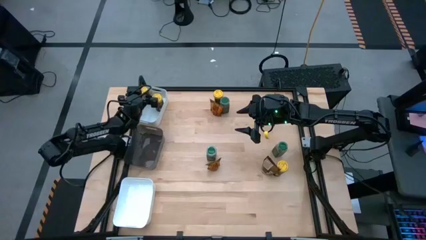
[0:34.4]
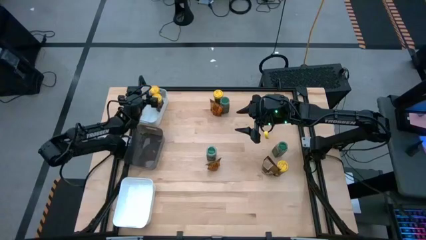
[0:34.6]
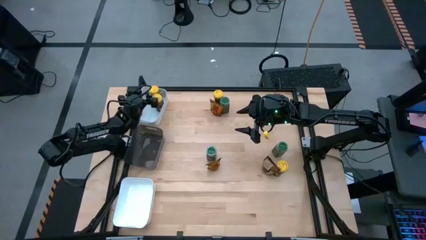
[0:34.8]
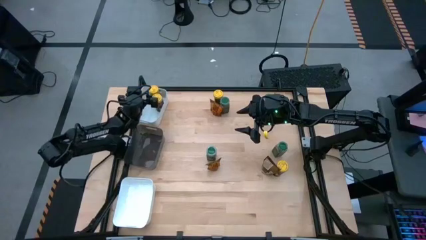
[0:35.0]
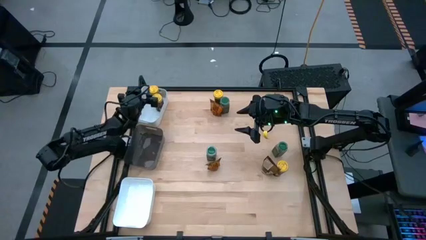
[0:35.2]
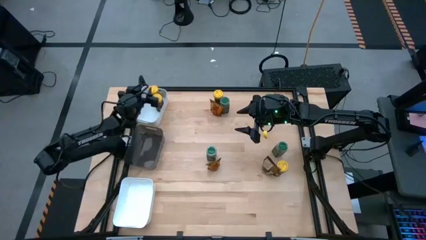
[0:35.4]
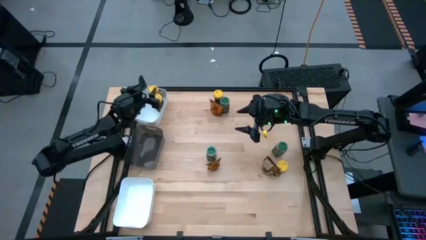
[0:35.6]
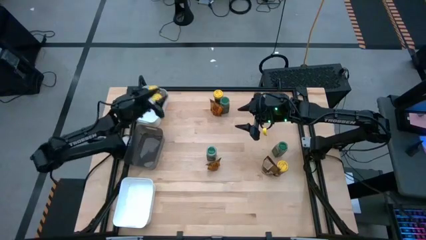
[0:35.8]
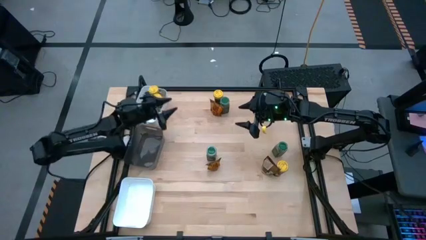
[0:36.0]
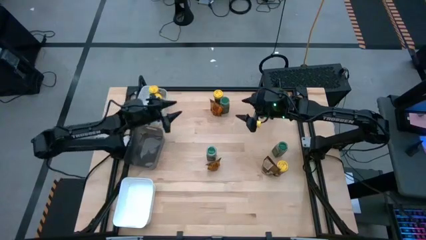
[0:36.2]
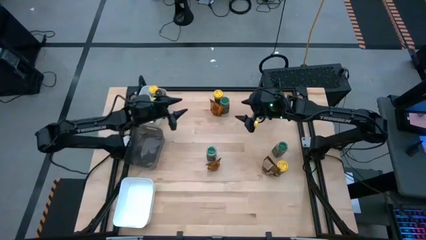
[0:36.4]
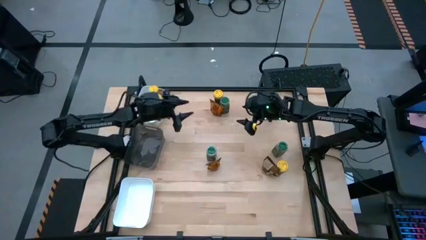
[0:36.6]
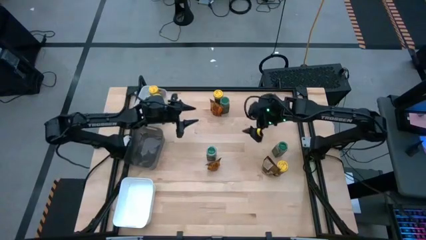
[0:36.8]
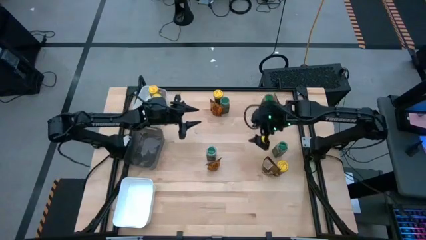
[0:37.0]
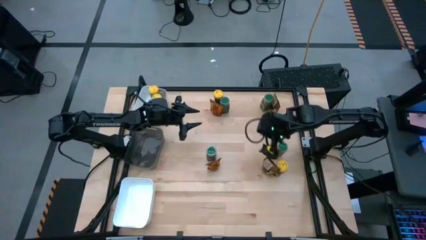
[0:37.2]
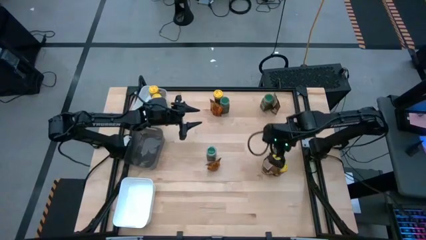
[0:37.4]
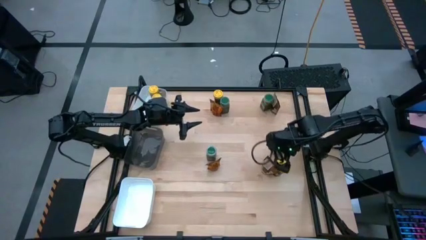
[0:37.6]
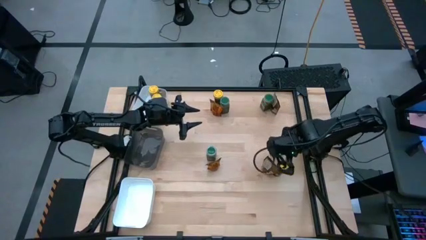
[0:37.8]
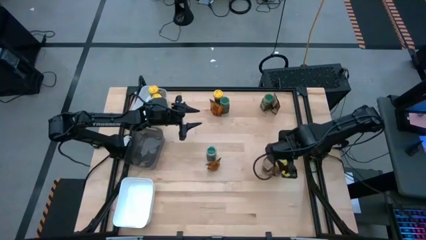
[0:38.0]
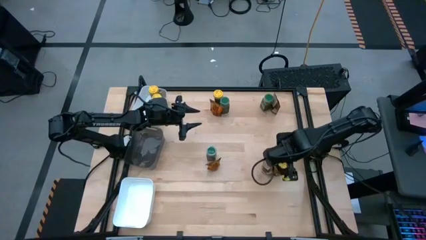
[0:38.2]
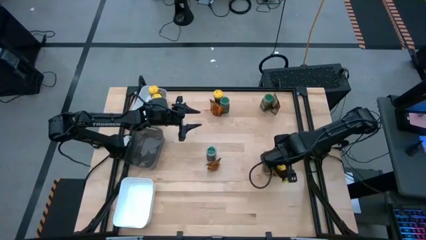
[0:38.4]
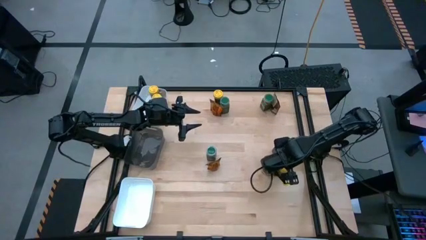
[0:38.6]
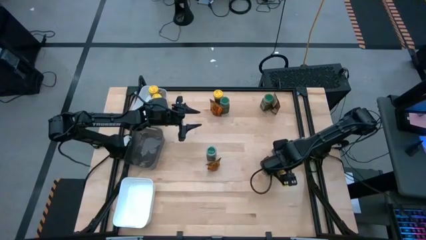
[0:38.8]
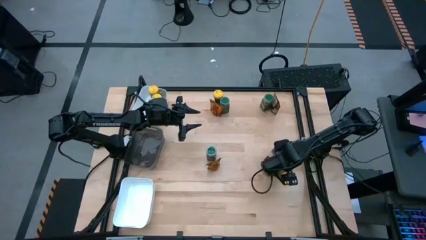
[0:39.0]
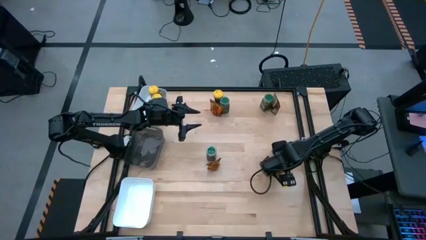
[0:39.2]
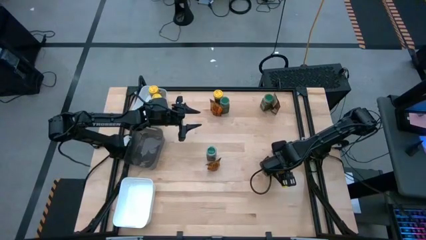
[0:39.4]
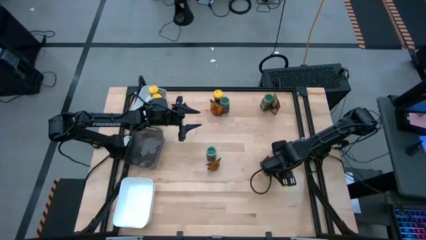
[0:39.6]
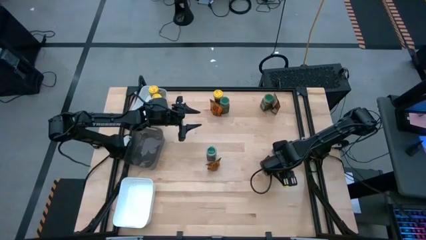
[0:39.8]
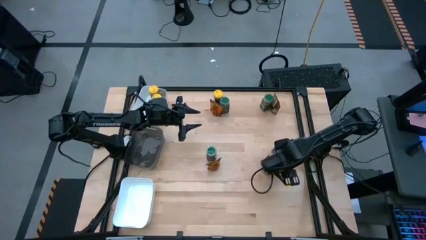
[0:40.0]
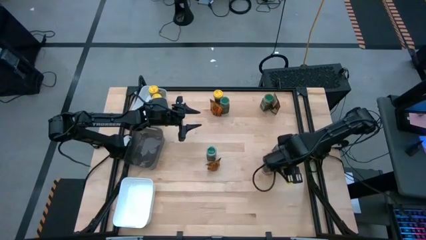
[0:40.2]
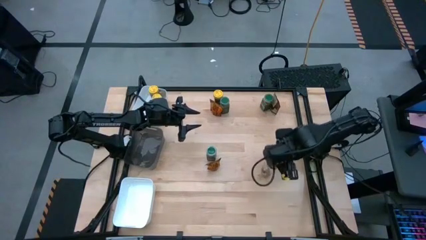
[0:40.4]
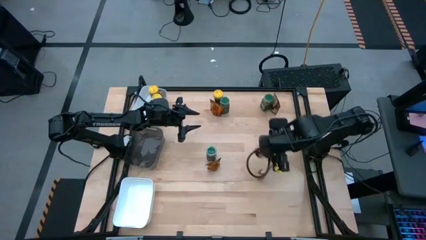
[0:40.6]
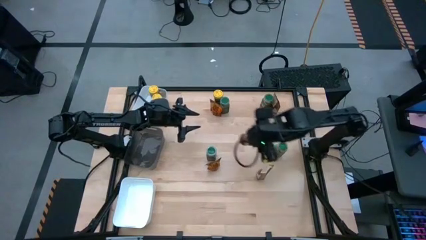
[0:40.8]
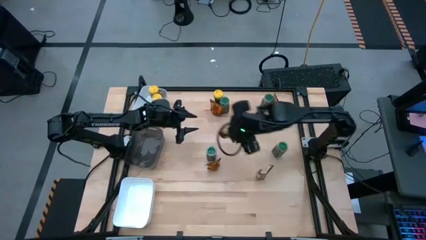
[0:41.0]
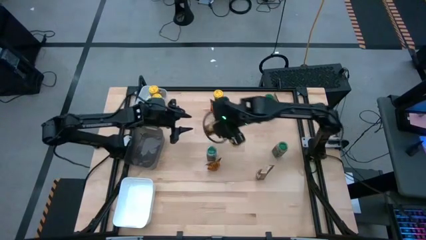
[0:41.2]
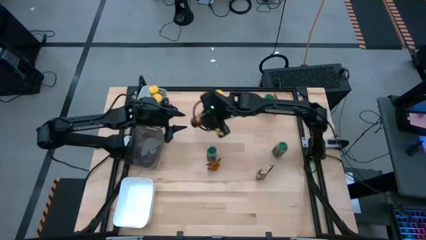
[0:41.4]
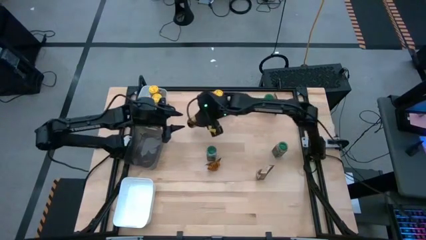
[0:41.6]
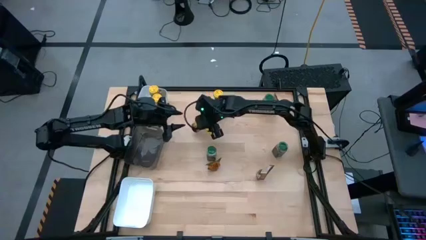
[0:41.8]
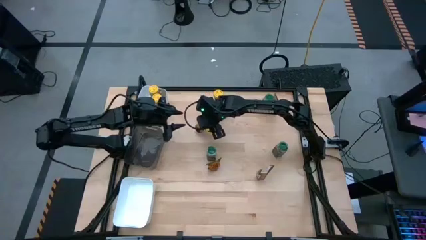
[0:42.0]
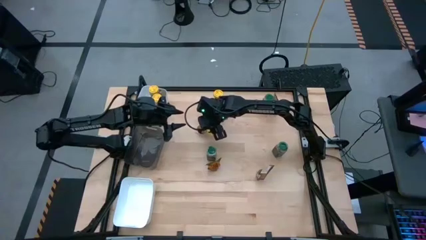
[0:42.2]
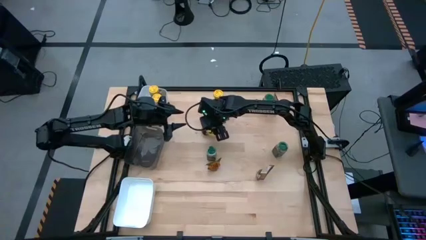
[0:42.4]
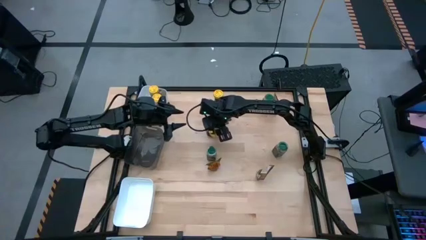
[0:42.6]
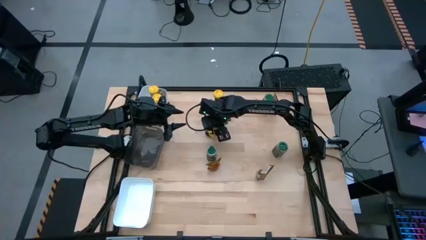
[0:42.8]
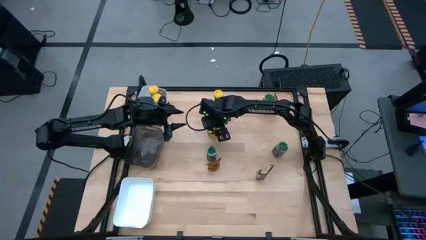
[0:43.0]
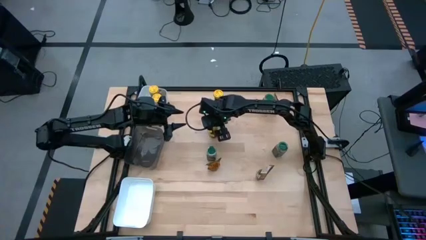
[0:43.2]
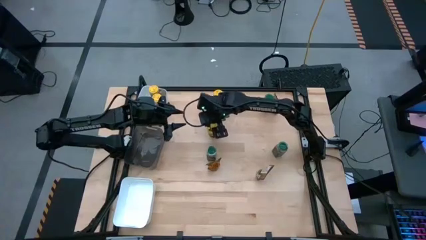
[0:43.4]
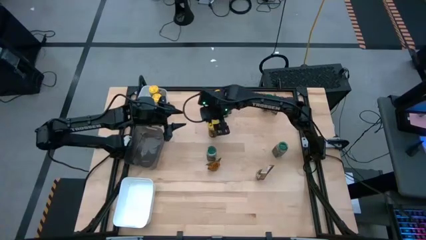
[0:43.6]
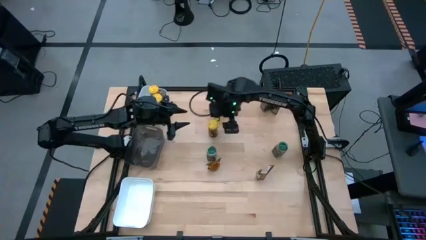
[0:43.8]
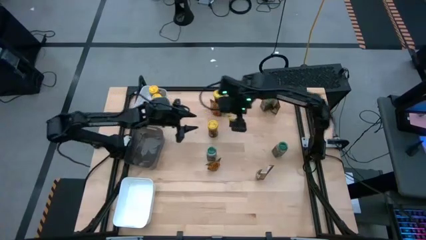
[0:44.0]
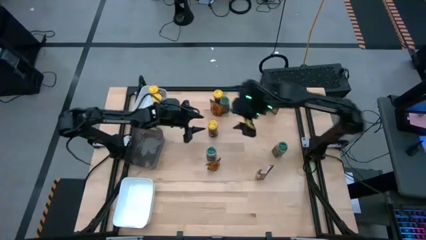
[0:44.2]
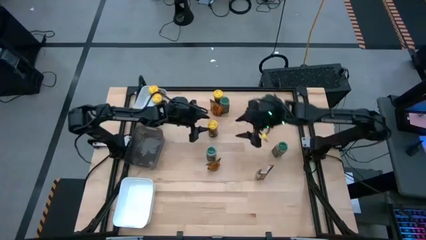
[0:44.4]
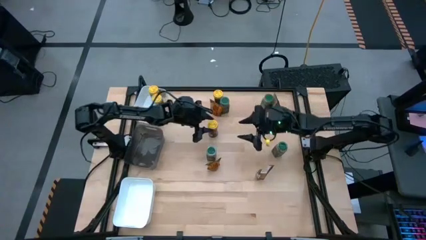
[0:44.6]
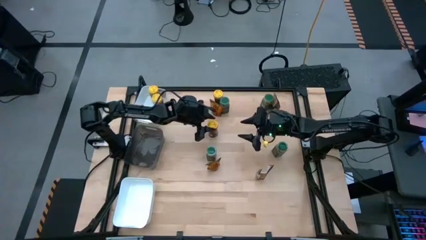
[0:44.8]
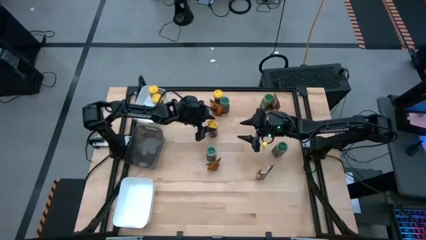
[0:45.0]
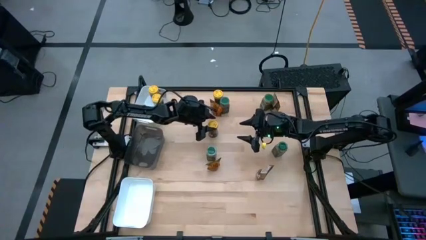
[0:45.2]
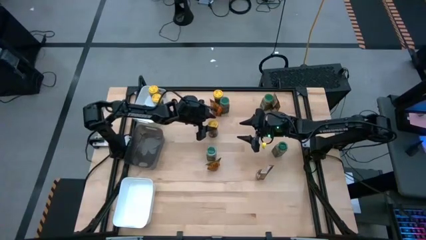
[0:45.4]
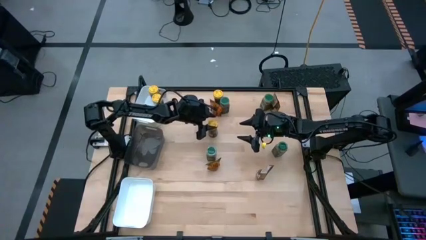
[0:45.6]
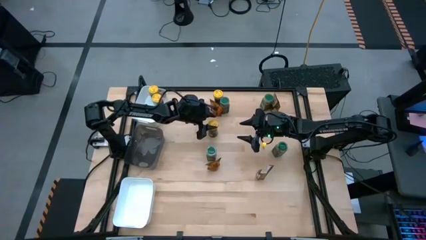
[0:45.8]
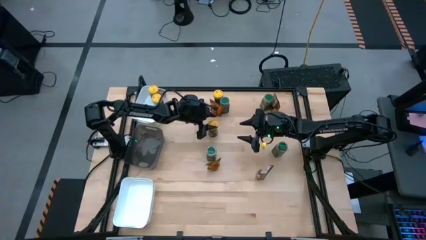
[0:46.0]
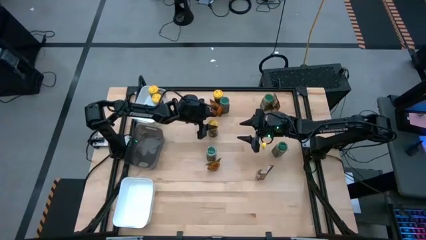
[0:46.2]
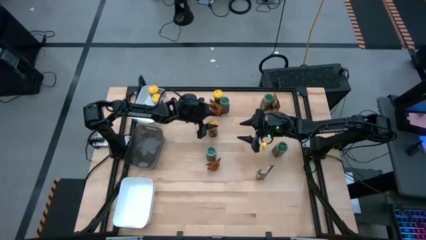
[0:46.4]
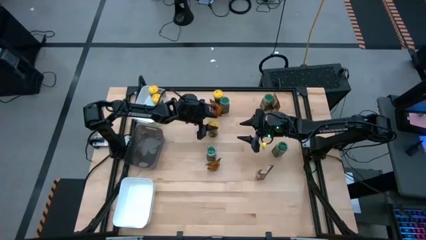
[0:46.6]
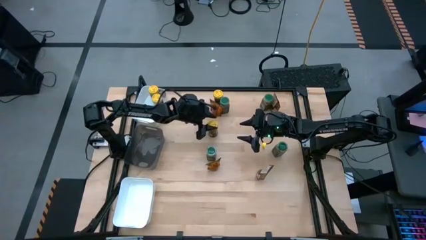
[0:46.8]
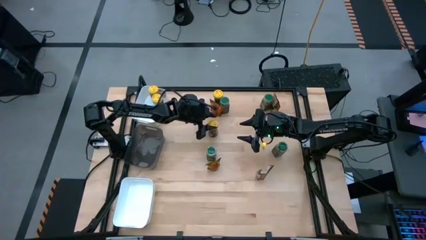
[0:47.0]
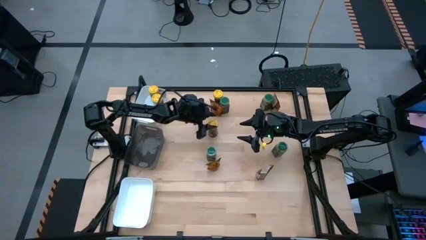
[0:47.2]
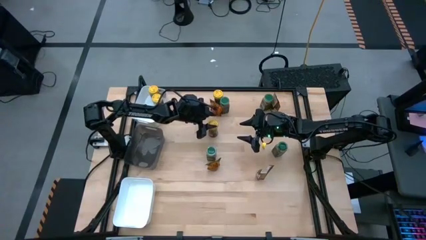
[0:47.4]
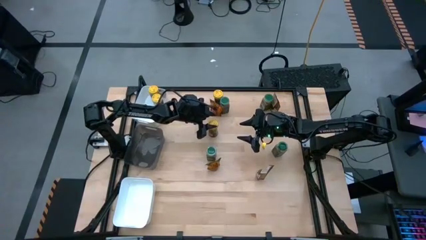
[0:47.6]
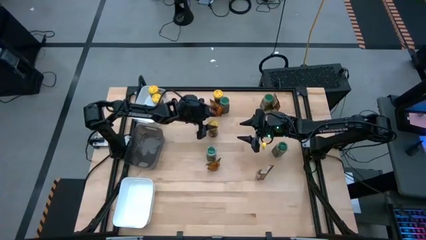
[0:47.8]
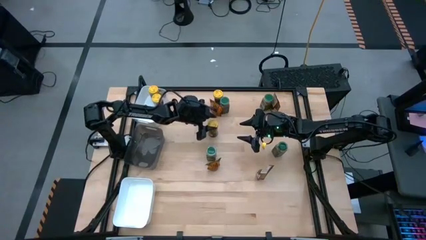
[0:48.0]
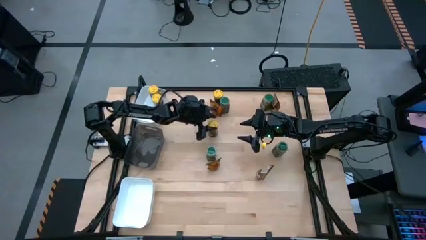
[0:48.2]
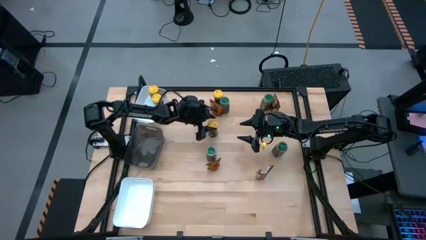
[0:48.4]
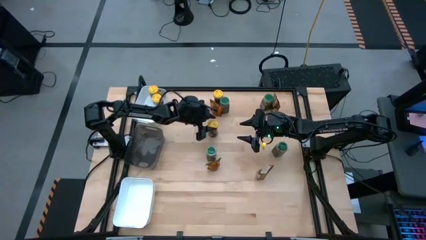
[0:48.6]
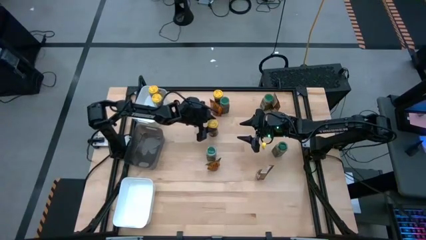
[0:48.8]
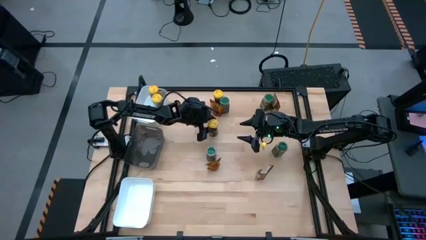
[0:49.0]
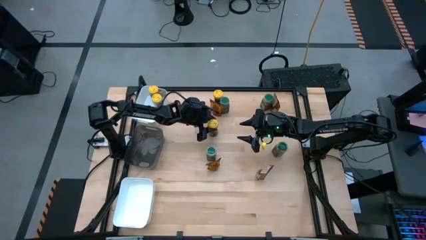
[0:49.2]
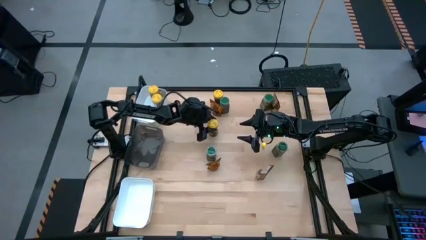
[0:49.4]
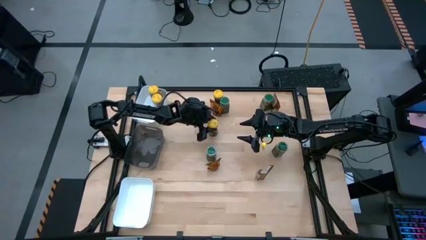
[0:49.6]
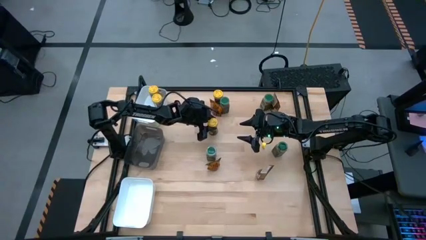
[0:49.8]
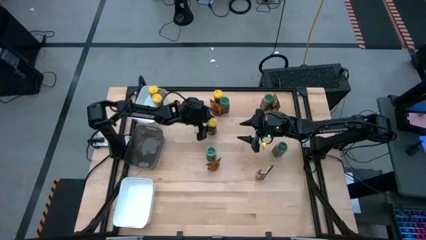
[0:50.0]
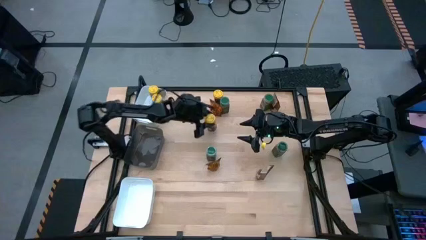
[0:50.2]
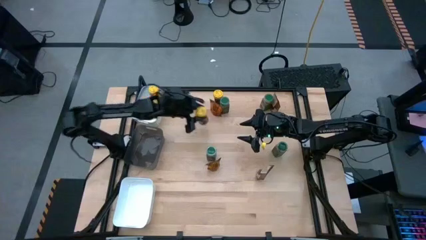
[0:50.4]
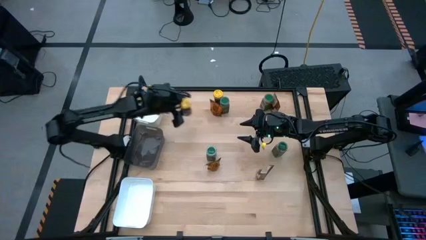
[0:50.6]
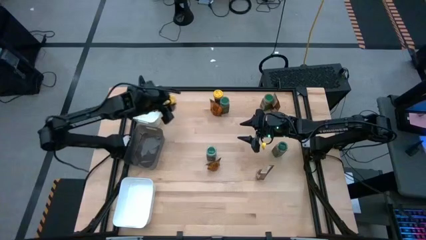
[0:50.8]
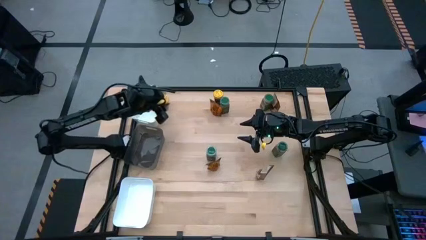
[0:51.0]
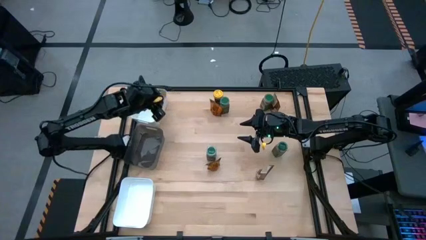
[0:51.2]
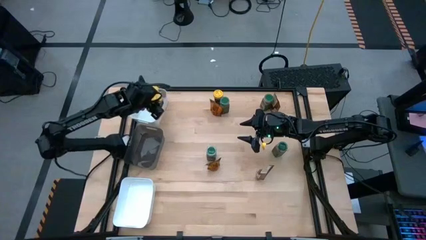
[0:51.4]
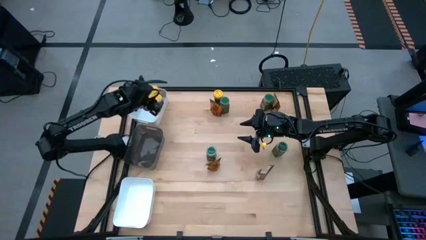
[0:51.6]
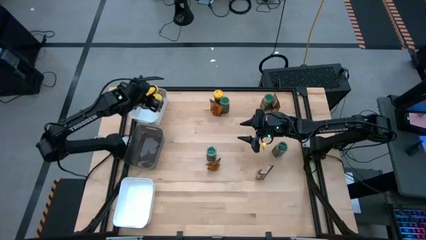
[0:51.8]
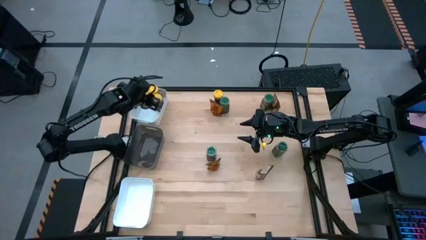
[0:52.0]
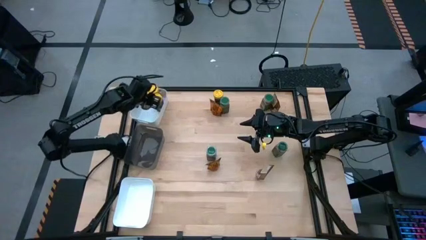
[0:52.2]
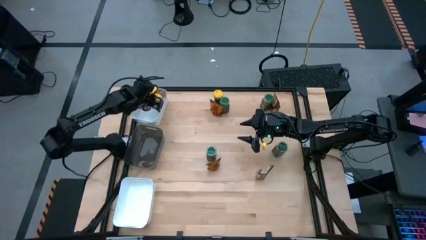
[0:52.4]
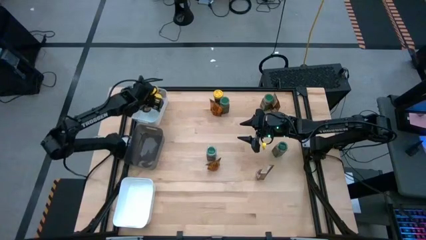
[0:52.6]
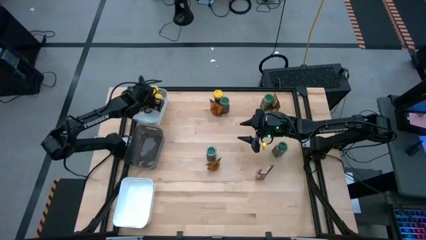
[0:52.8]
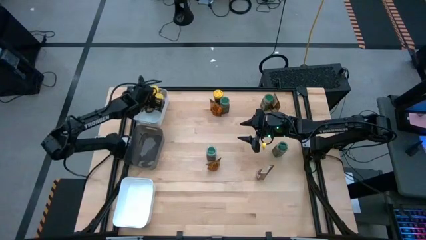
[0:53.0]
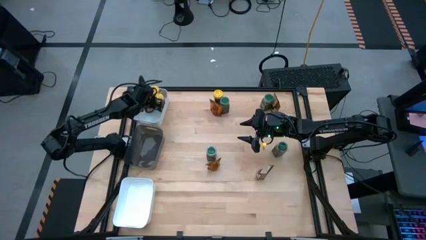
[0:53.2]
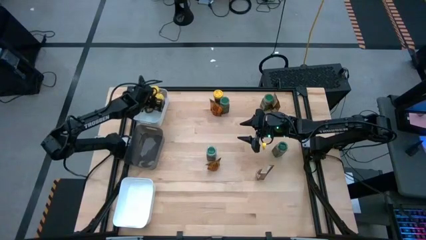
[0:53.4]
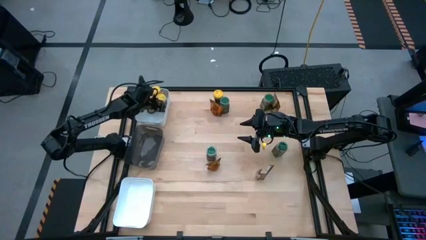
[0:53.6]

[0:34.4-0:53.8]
Task: Sort spices by type
Put the bottom yellow seasoning bottle into the top white bin
